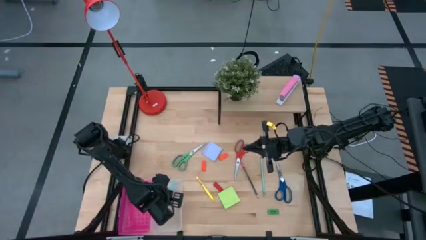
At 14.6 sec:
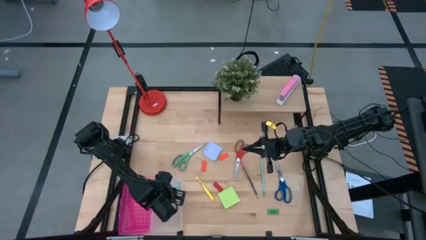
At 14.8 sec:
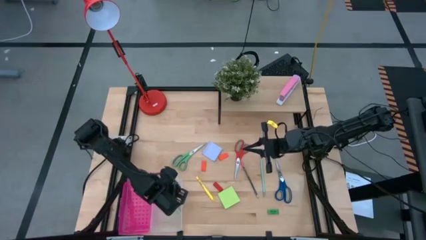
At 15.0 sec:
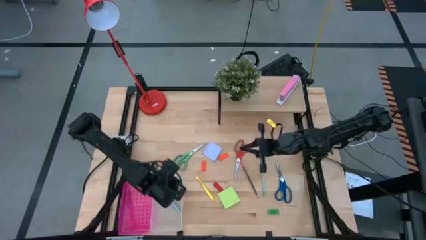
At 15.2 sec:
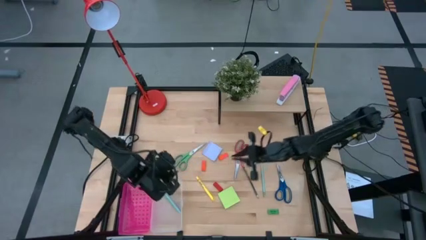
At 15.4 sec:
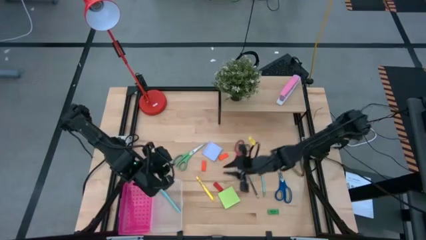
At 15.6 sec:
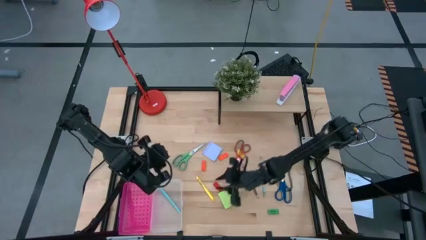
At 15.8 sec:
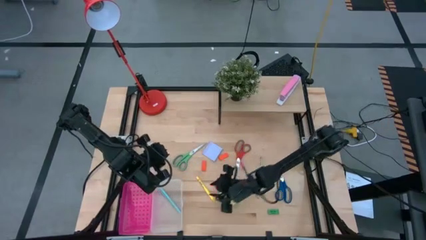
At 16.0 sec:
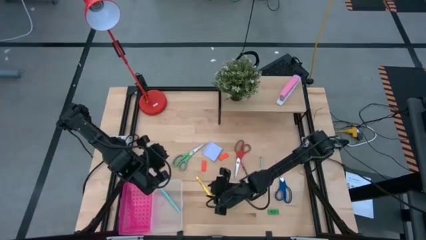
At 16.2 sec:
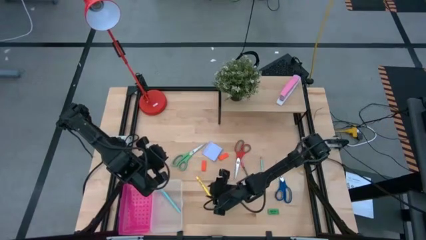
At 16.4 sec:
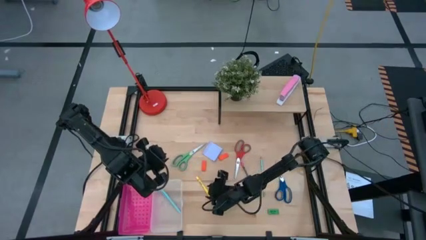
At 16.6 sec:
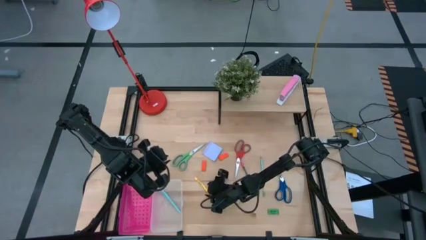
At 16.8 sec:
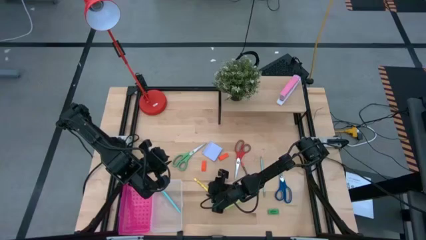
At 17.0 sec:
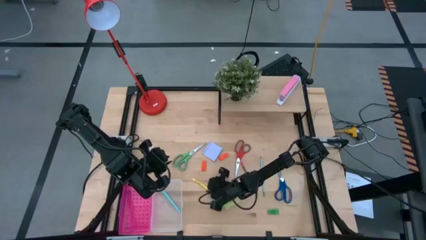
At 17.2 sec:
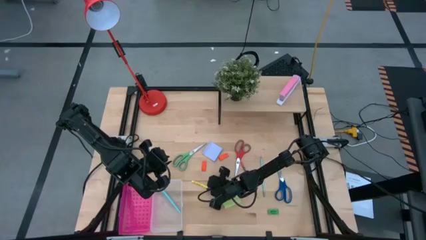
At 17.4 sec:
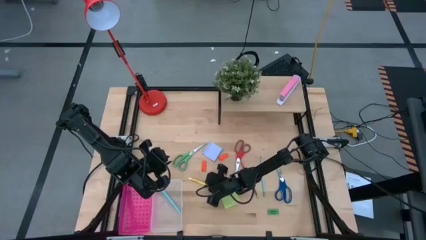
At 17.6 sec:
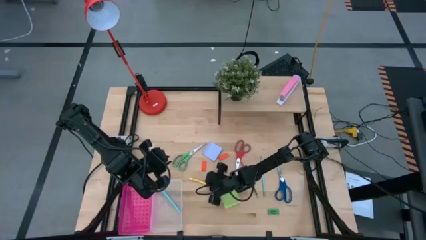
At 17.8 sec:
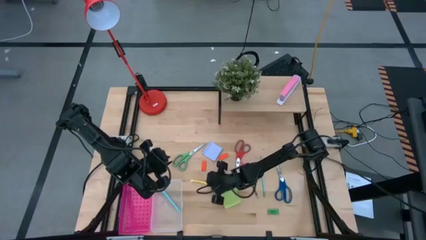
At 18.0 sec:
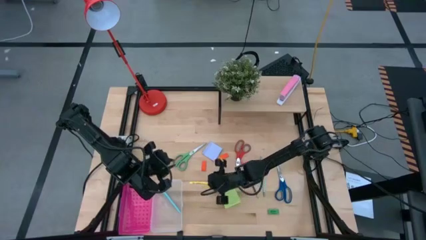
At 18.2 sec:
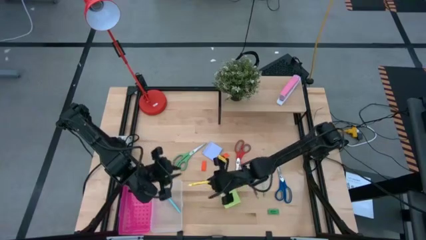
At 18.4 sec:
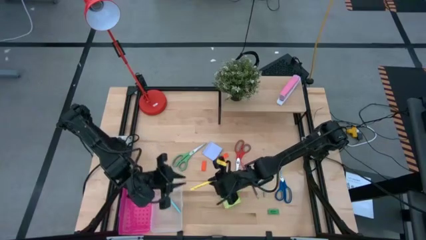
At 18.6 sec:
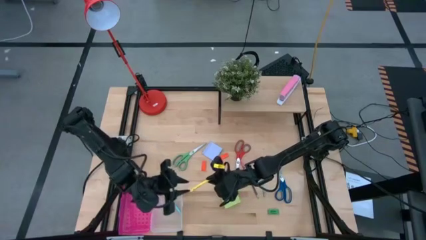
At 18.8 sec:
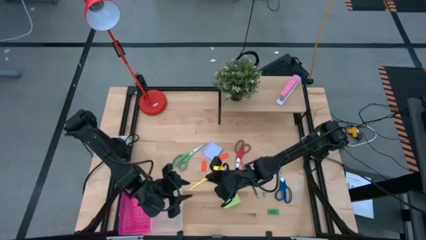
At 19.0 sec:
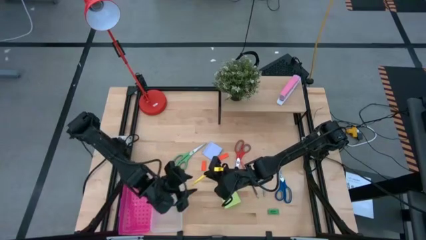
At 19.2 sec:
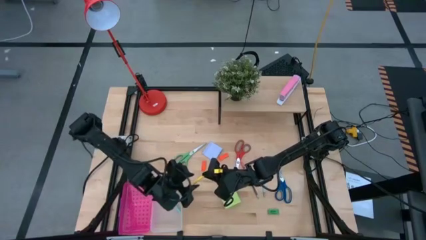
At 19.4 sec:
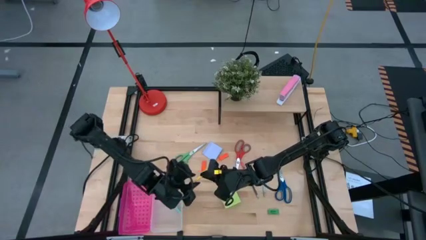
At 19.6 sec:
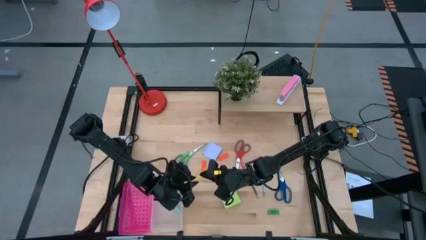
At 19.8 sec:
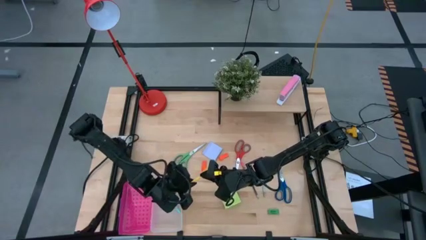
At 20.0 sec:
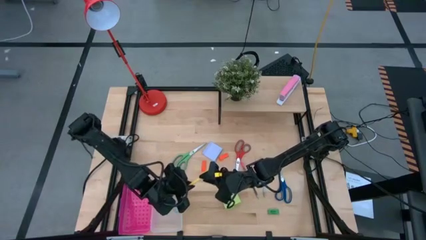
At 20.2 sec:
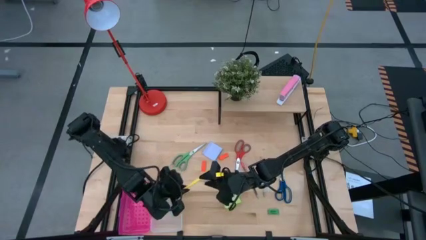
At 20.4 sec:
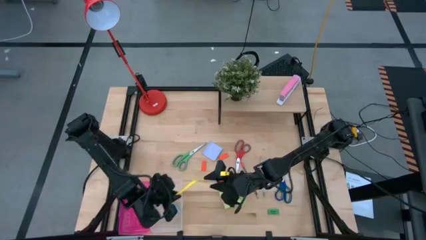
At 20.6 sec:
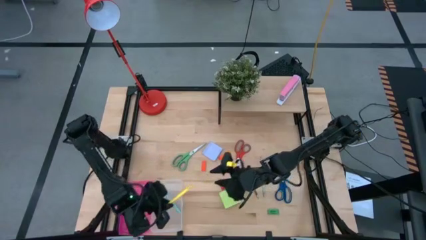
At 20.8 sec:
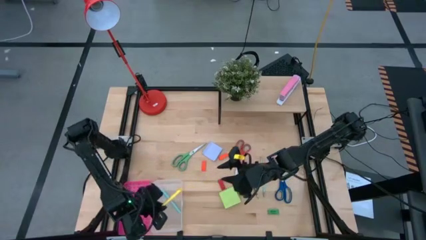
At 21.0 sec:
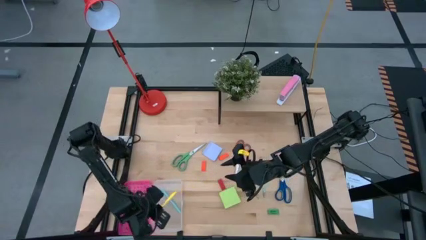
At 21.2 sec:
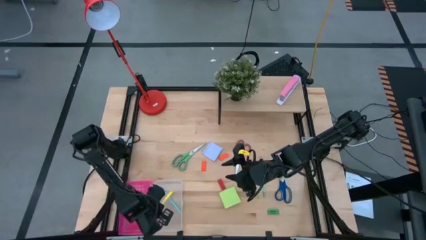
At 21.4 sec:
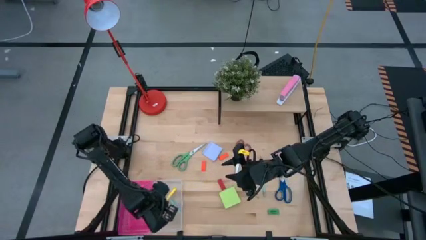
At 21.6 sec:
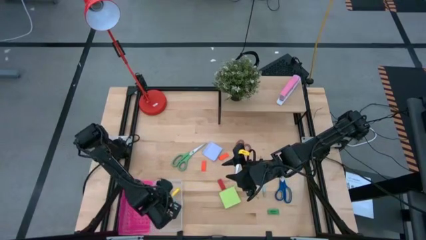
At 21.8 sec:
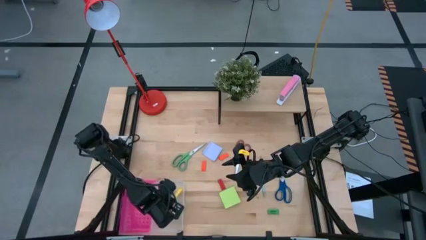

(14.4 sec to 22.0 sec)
Task: Pack school essentials
Put the yellow pen into the pink supply box

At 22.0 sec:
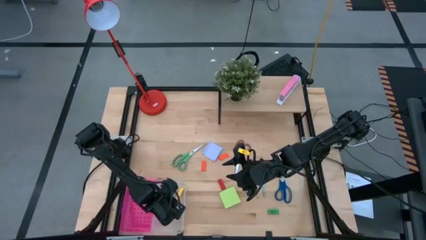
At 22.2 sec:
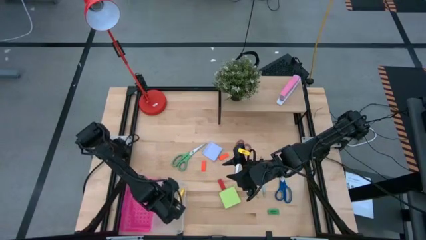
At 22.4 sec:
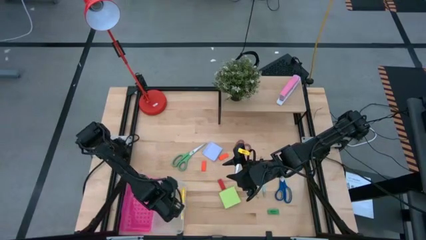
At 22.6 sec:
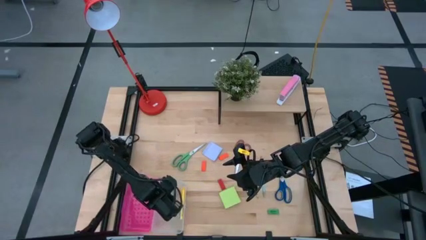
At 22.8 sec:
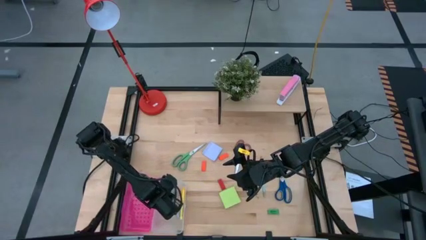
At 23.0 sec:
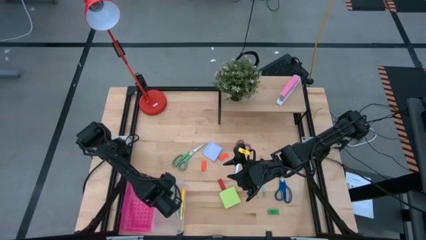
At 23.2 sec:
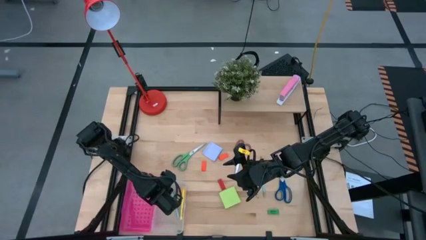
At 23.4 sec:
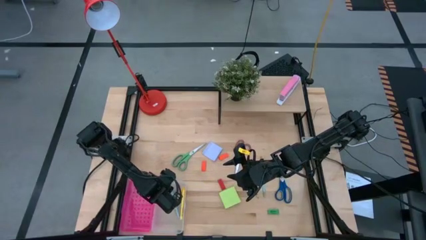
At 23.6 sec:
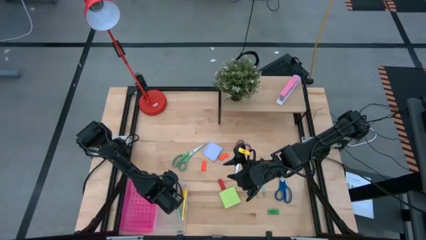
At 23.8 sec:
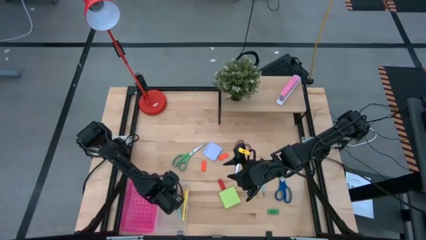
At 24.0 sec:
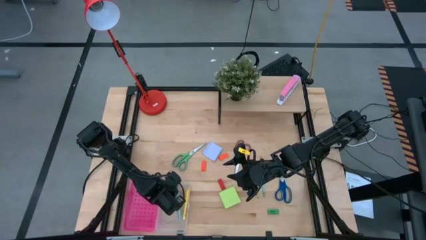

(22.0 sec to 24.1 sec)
Adjust the light blue pen into the pink supply box

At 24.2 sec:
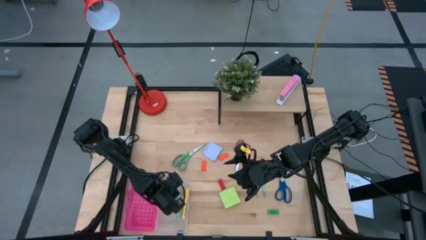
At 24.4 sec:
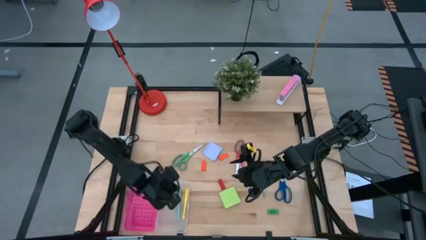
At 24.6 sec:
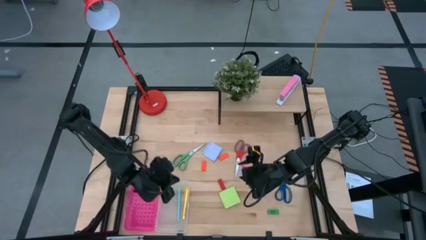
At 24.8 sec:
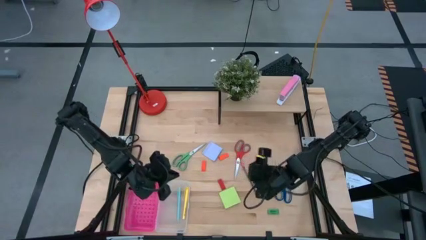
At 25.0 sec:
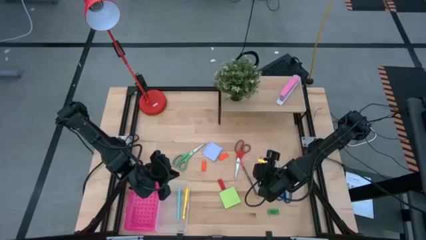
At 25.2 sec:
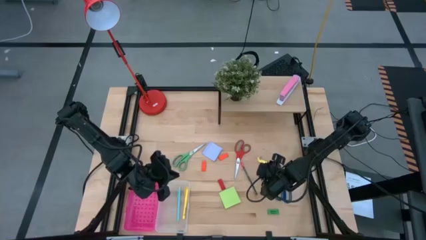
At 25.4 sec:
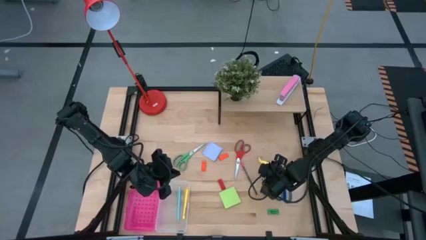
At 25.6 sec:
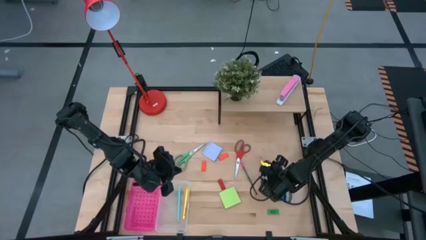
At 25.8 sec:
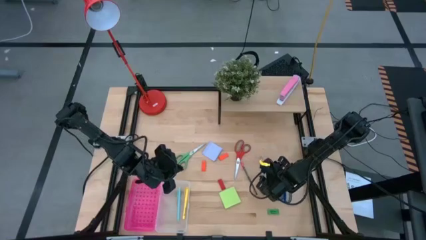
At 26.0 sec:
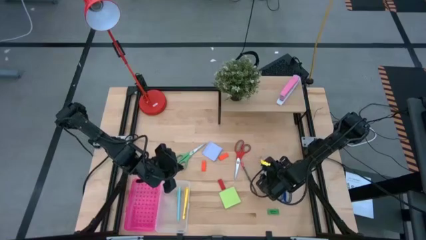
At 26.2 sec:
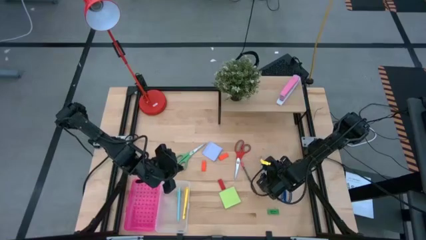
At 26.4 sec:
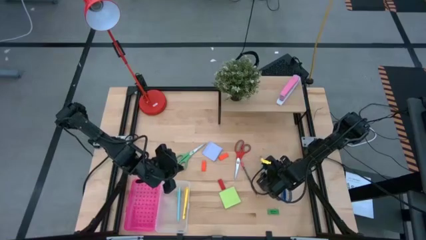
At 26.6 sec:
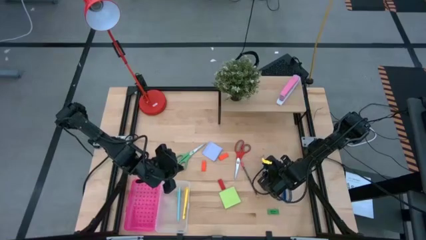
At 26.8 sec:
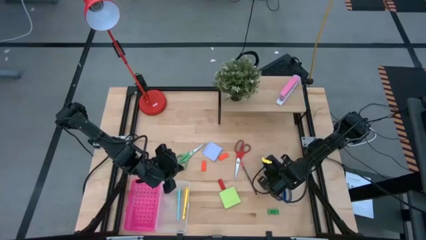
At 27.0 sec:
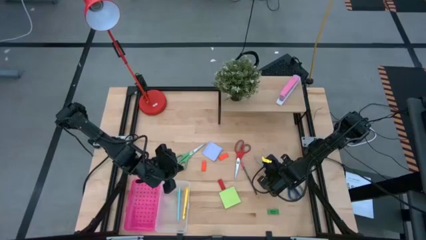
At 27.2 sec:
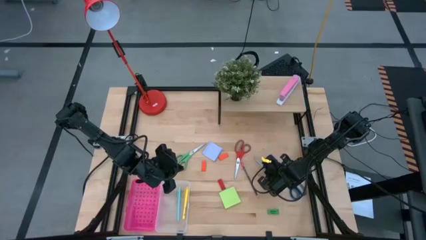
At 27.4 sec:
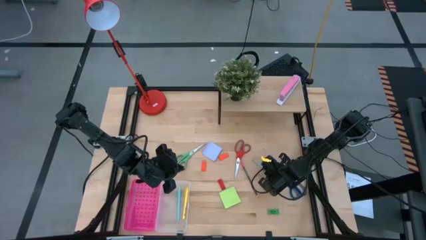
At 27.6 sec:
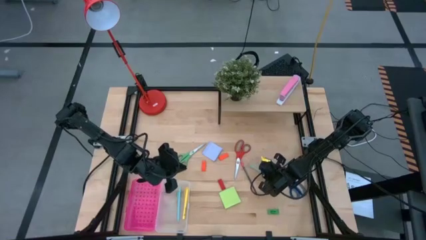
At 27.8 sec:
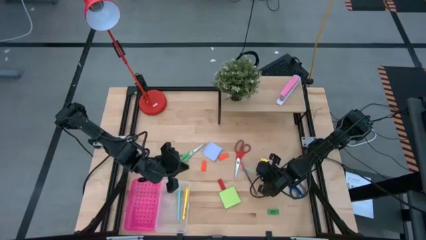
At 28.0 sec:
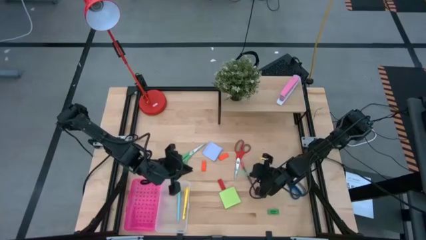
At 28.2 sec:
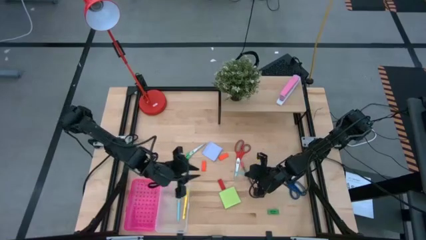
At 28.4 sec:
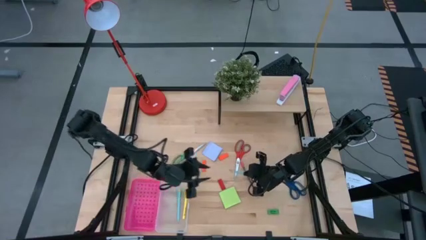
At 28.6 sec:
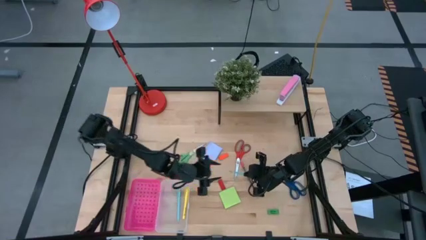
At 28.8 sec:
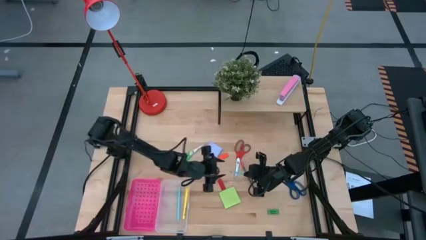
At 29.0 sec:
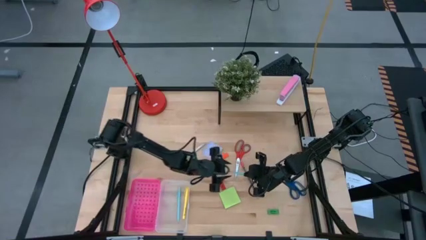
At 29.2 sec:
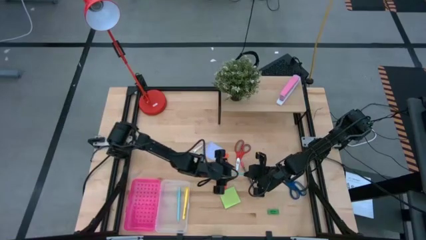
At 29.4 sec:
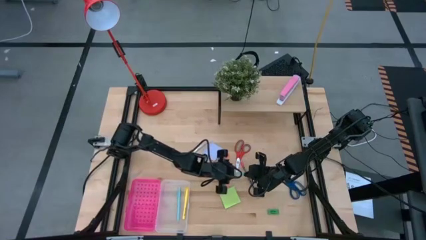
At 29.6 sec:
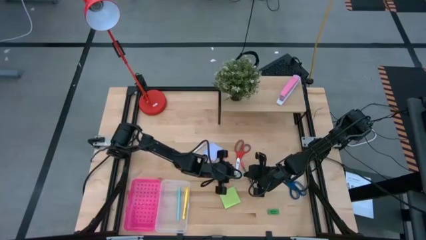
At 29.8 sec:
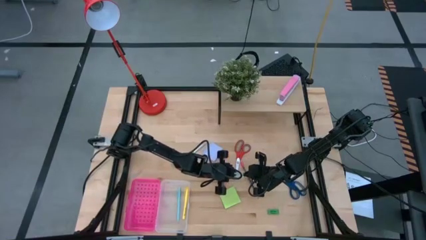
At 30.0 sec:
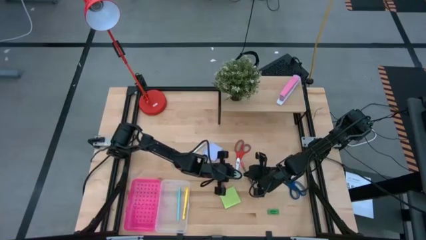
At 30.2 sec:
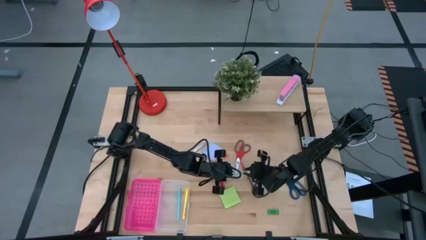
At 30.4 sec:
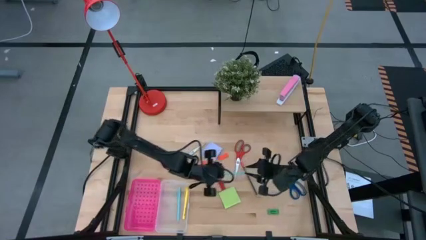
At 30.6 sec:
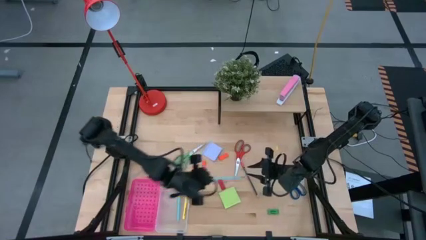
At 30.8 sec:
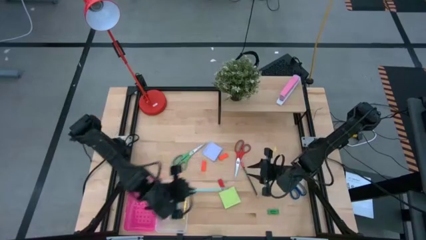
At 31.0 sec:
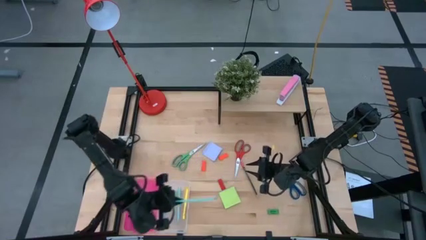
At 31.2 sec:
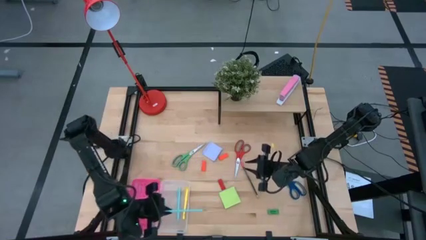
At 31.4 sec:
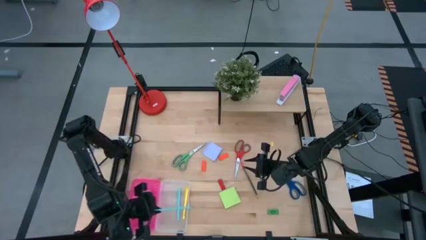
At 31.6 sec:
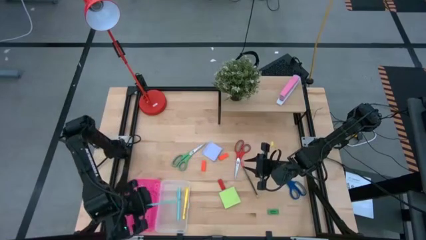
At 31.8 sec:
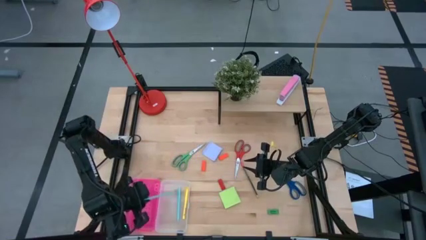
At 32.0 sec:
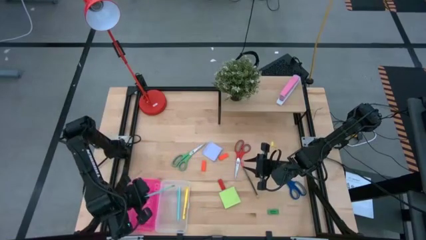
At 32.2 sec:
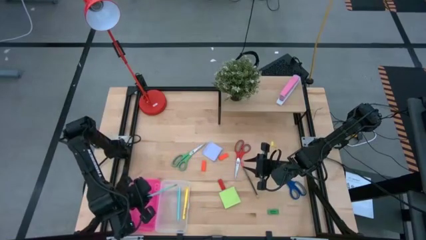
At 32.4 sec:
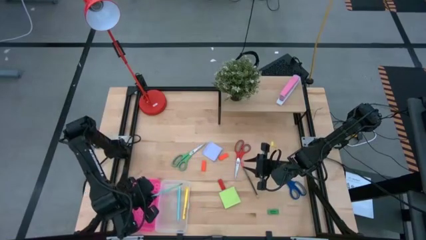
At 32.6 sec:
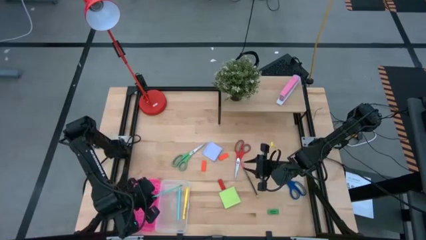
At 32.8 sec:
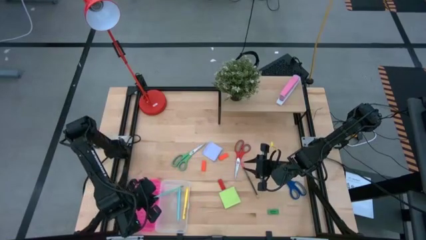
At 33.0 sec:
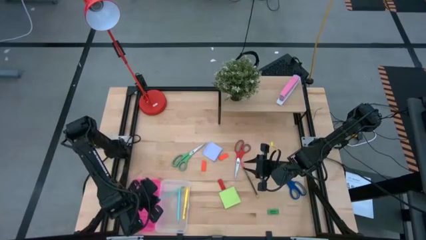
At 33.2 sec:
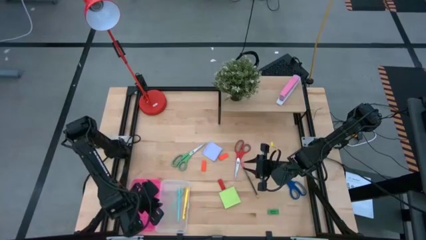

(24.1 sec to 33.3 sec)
Put the light blue pencil into the pink supply box
